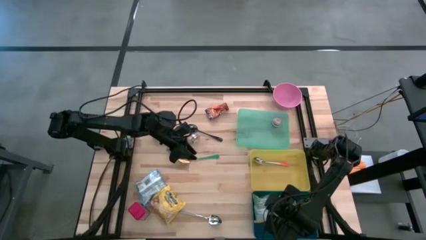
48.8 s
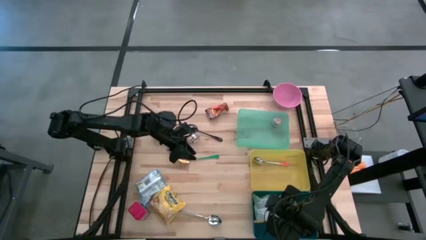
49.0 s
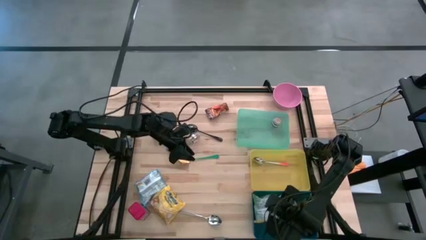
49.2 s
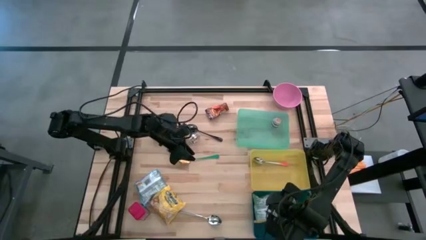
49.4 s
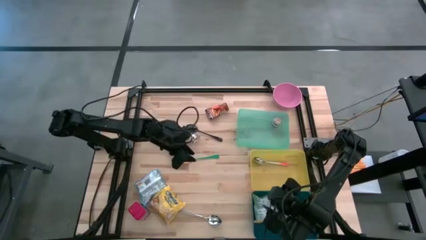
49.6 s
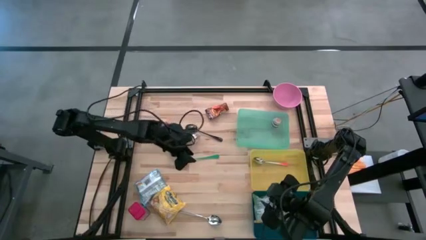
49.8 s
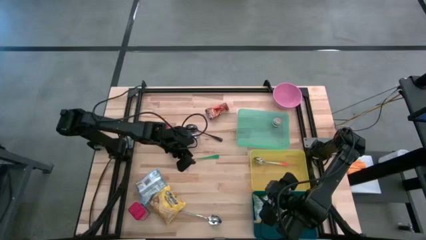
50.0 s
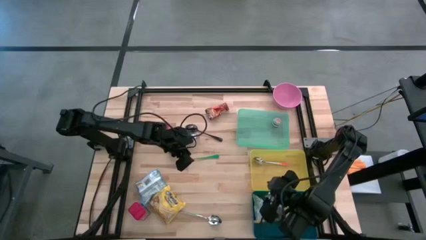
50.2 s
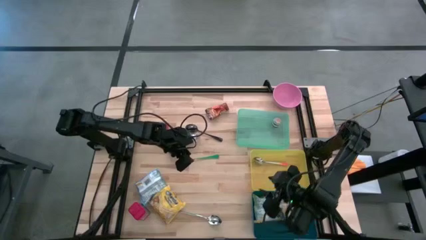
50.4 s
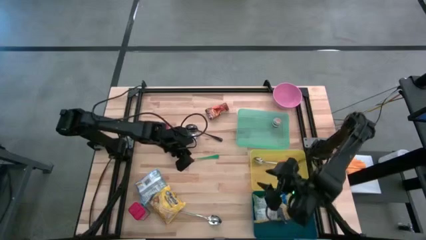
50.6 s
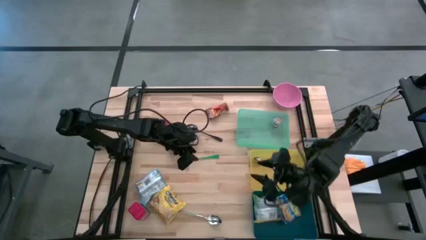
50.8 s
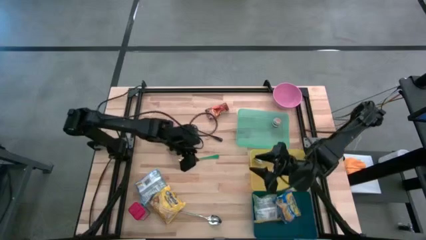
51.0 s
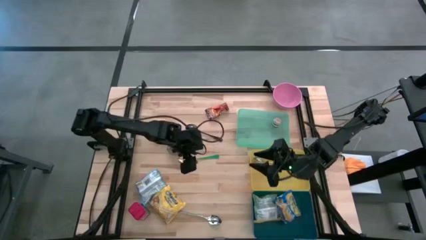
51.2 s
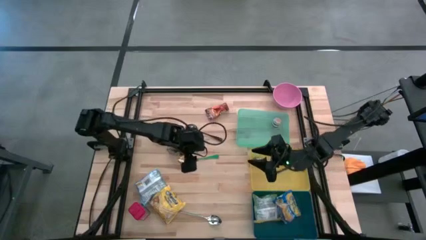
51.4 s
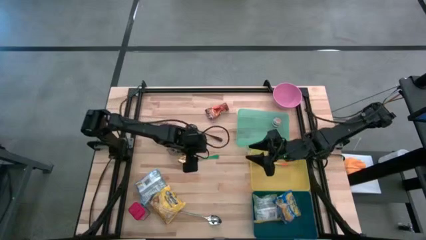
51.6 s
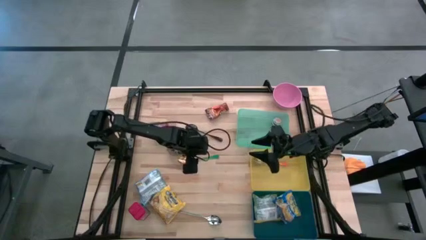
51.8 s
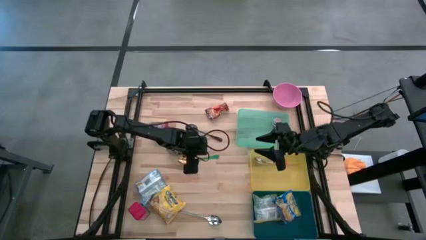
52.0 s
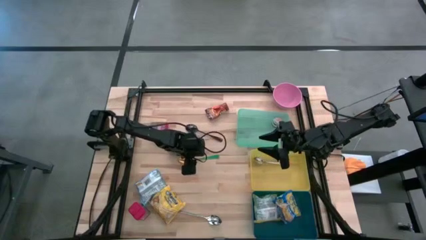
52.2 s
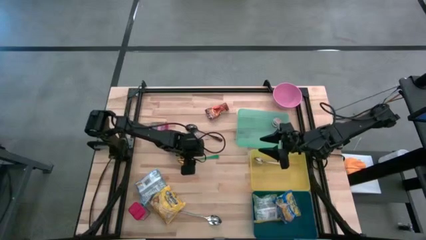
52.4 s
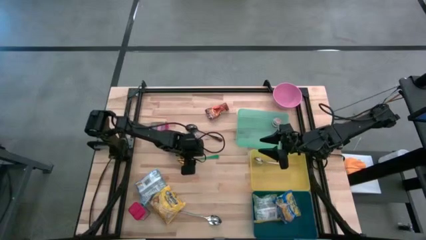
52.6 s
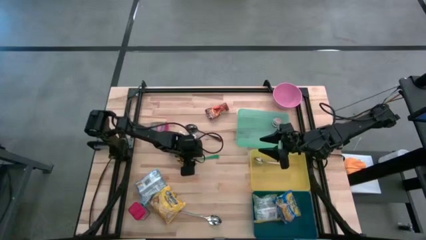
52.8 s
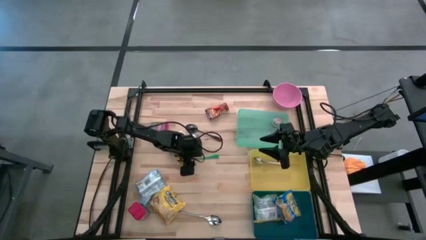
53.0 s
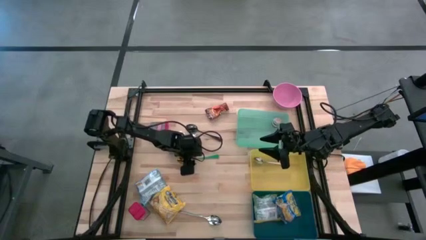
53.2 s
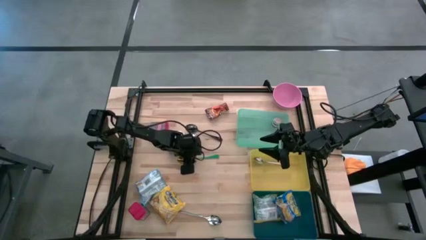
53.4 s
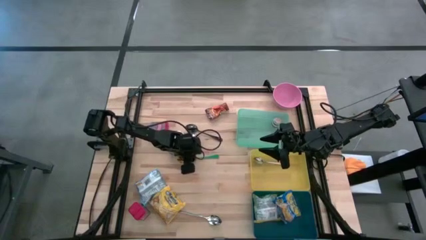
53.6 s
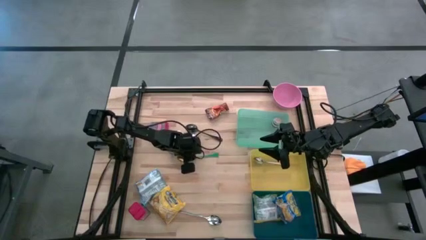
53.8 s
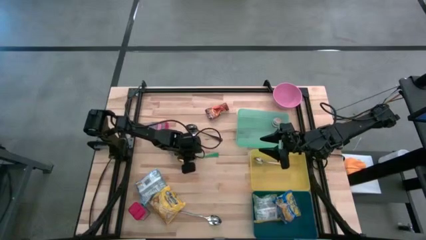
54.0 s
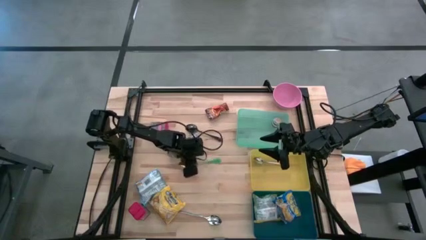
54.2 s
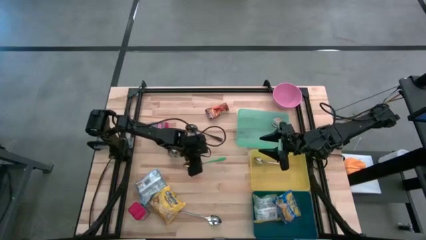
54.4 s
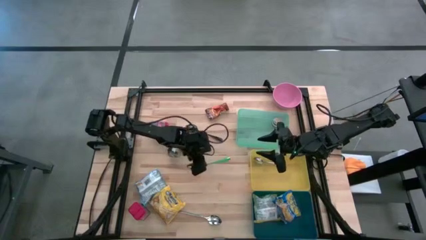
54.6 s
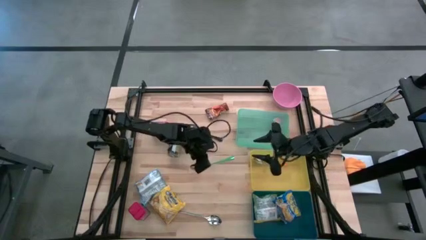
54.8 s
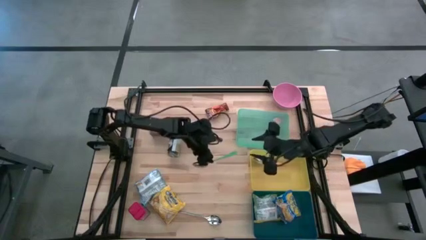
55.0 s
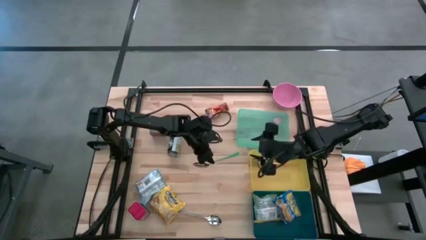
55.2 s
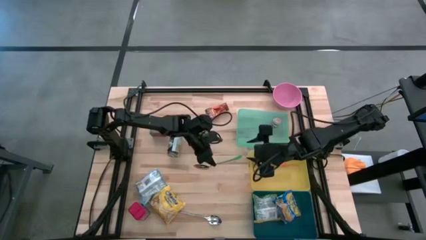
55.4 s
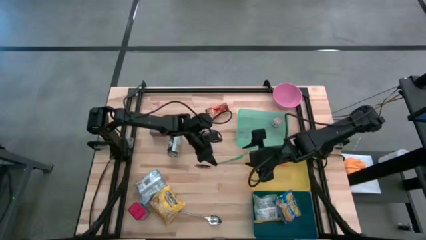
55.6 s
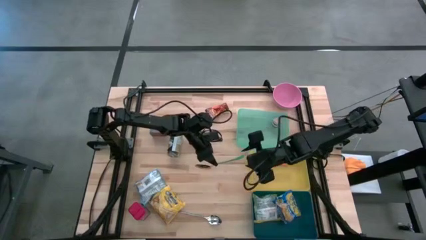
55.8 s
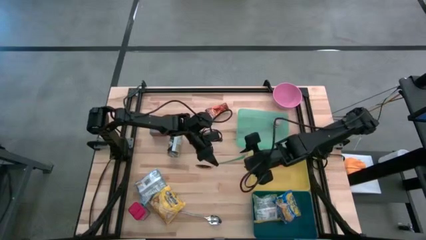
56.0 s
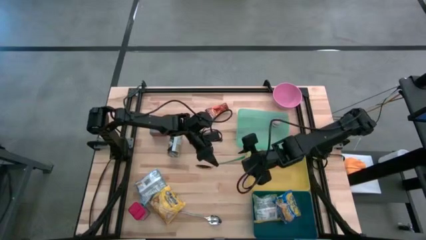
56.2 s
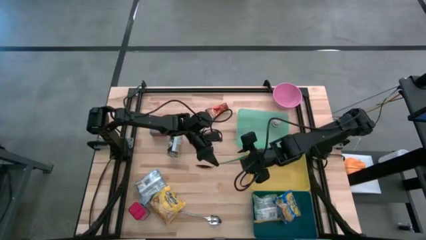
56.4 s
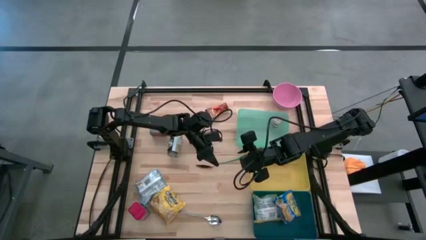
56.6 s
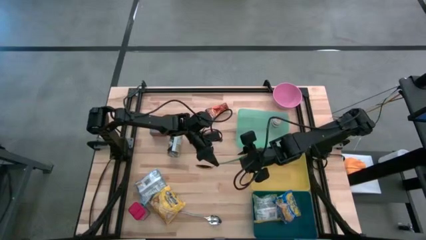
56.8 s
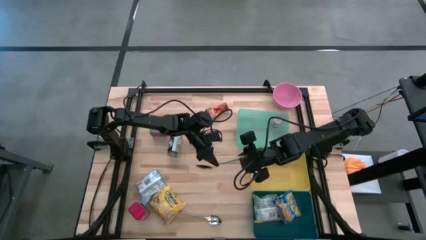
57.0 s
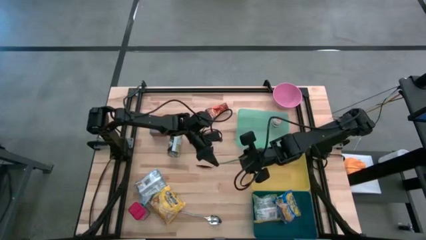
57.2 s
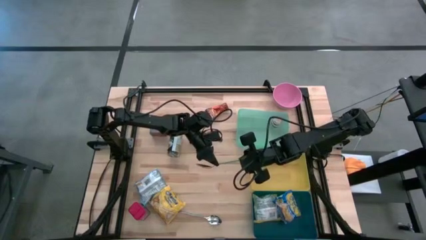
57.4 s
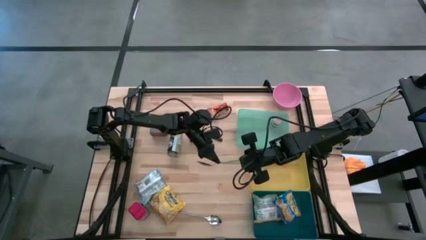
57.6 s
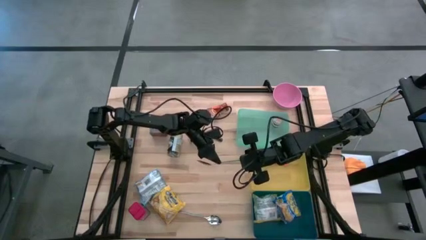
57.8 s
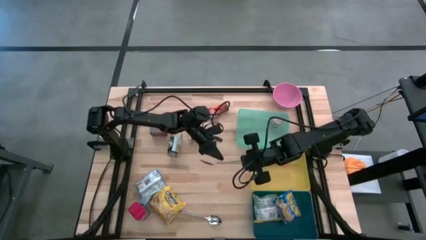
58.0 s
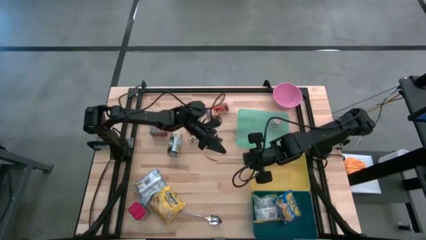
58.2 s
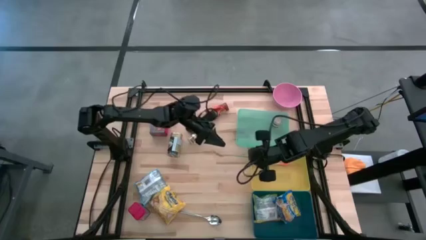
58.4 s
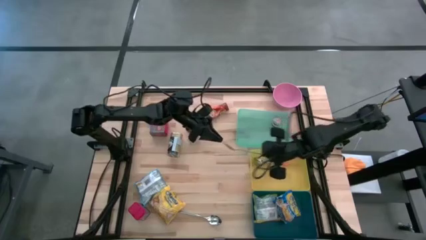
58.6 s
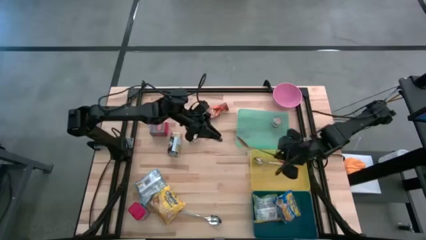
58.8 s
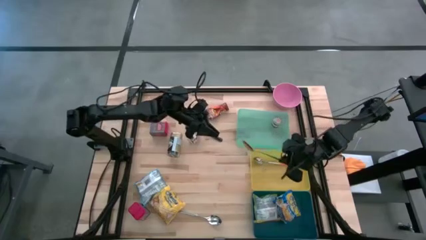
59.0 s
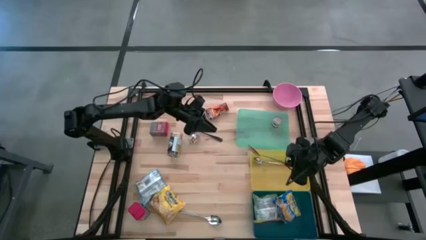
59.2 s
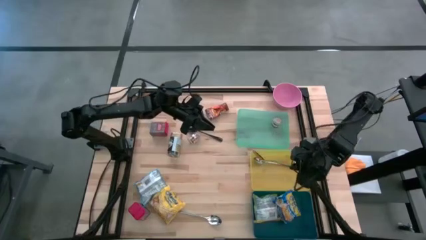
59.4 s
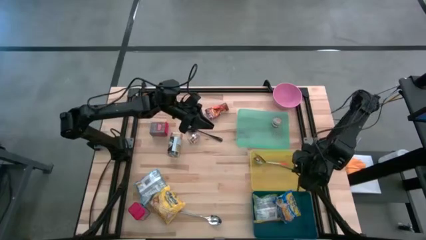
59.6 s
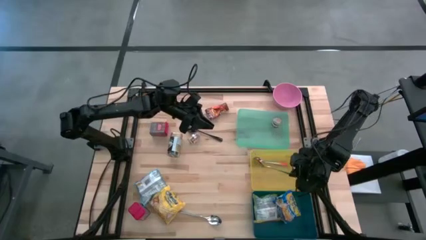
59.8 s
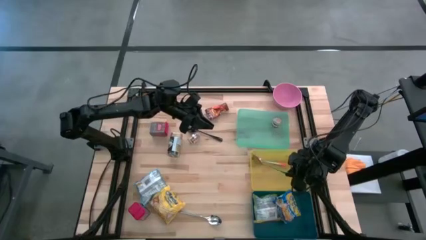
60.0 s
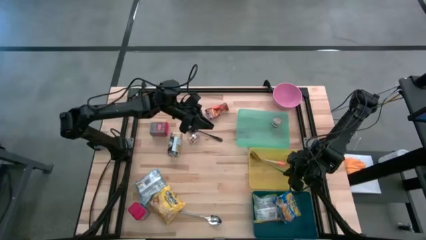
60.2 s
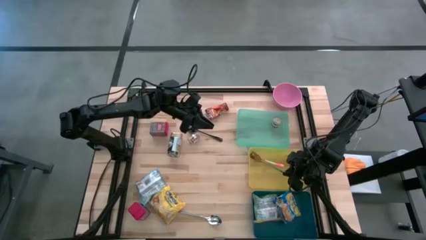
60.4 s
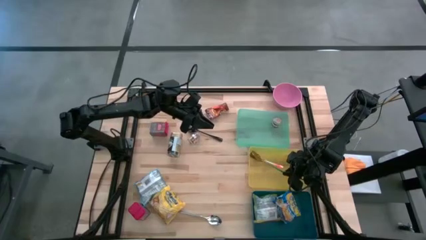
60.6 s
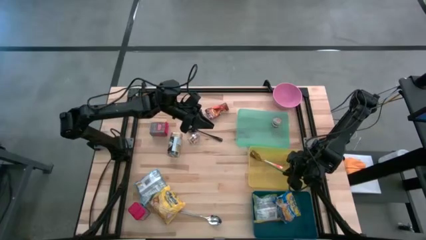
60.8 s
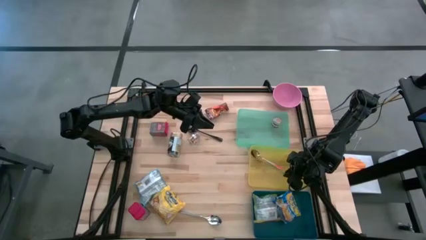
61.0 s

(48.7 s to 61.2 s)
Put the green spoon into the yellow bin
